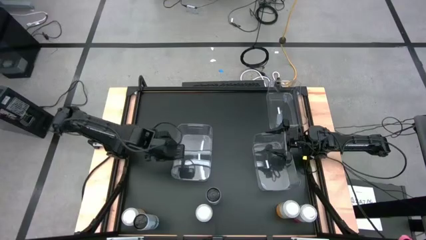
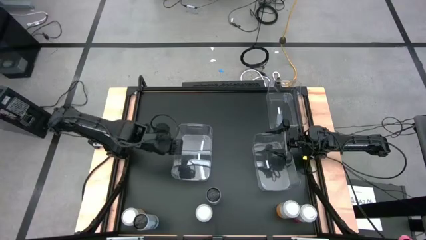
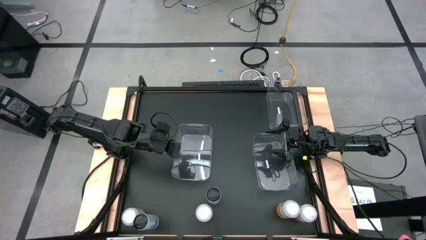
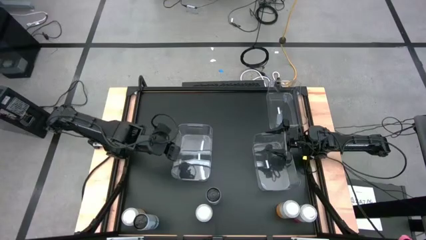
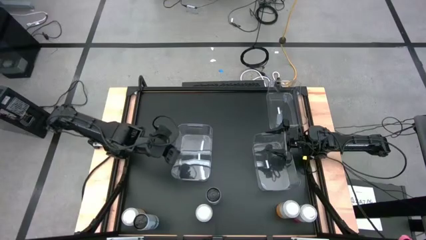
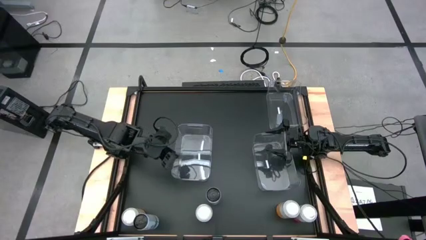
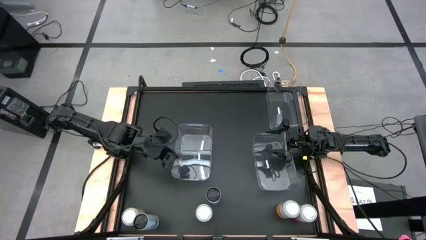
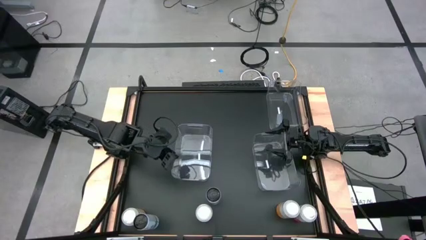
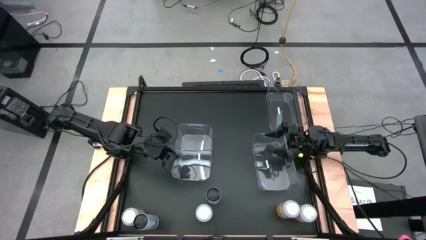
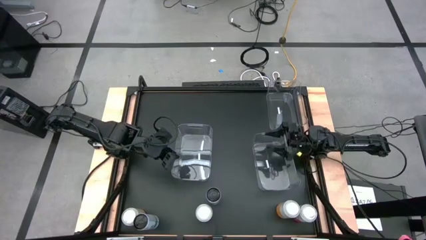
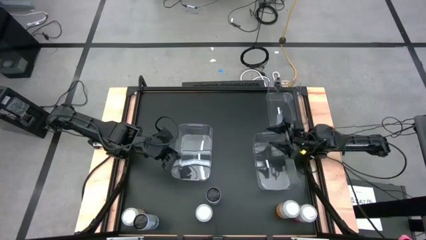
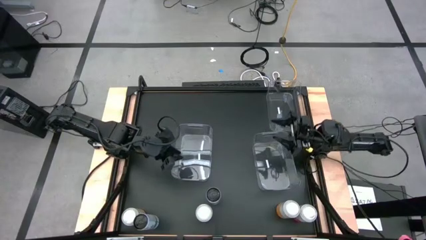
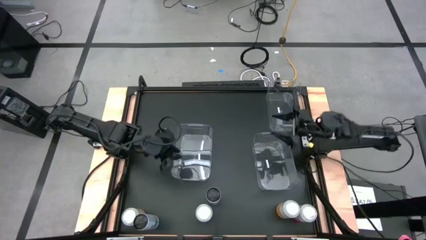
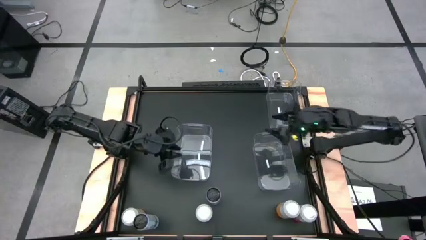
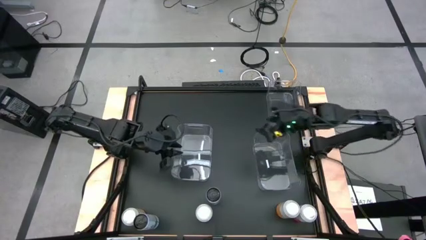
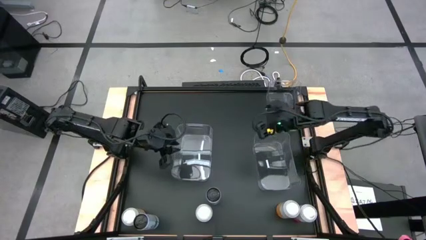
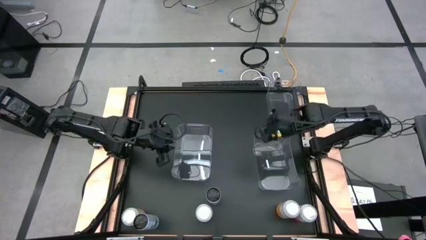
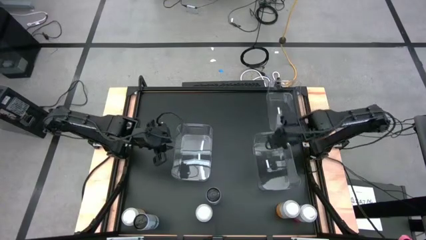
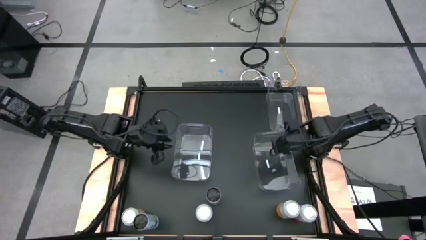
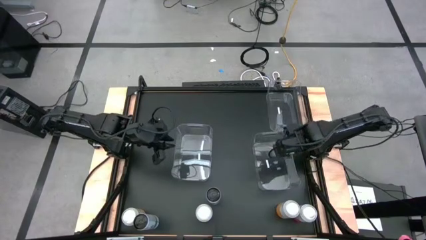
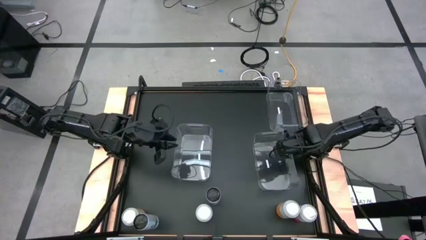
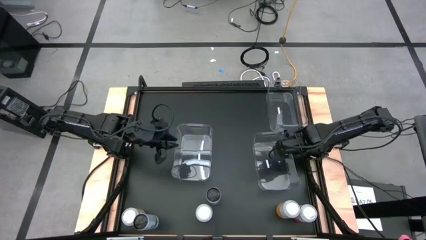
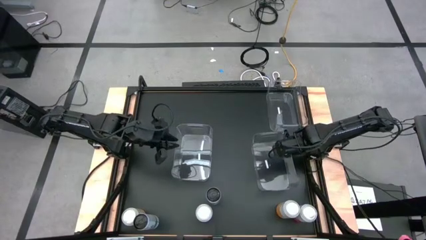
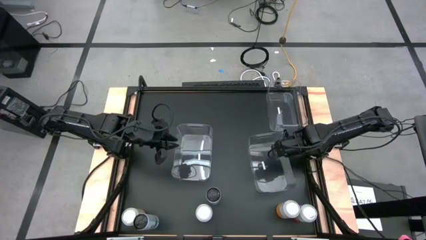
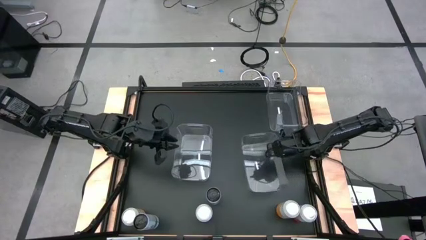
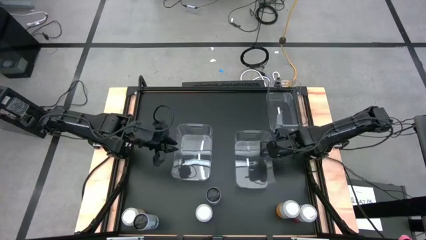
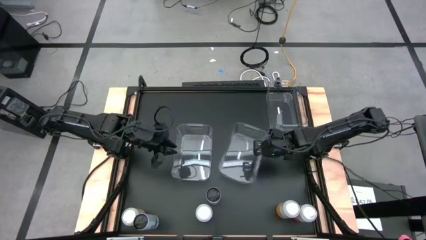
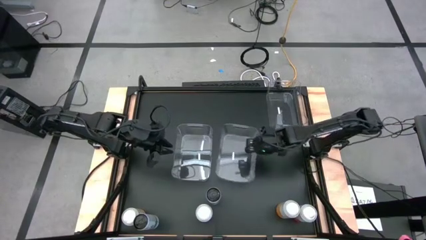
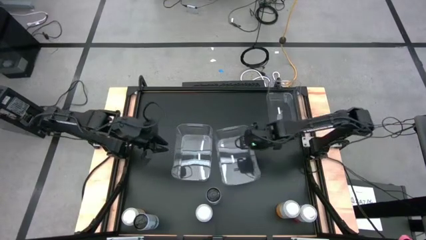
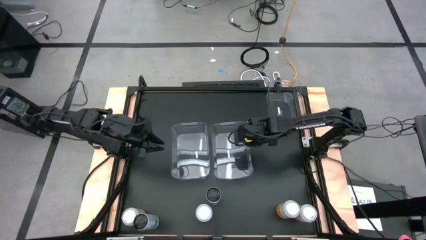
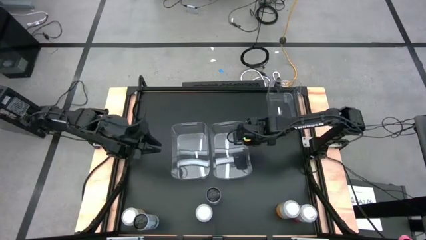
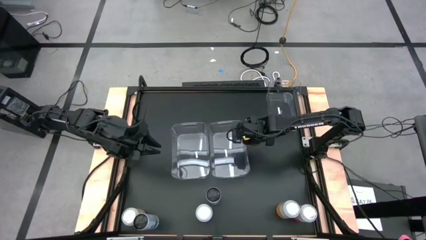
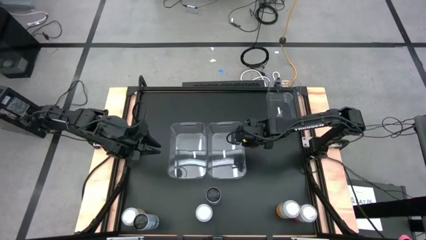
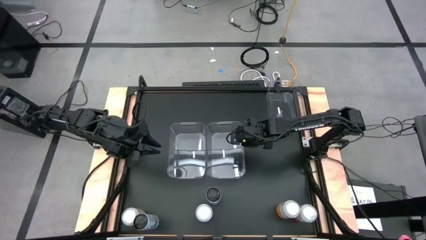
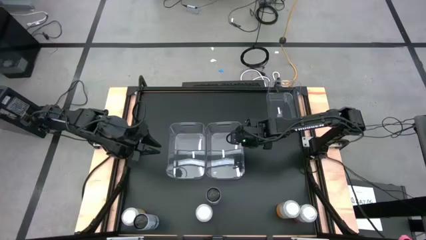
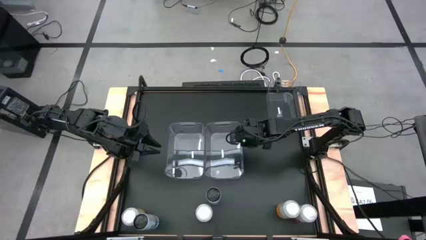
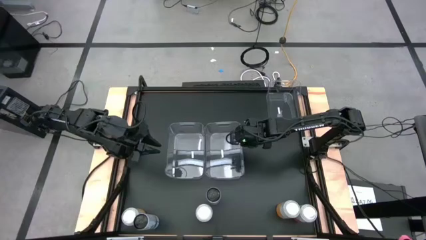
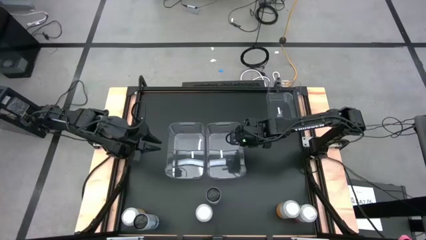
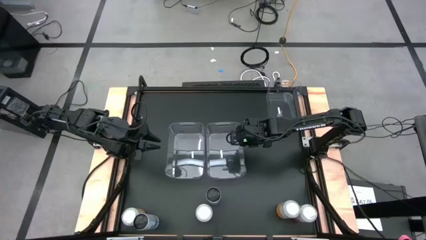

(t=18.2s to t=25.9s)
Task: Sort soda cans
Move the bottom right transparent bin to the center of the table

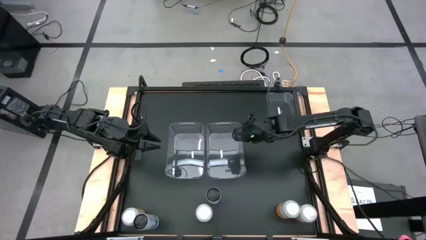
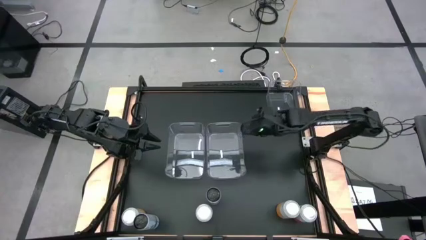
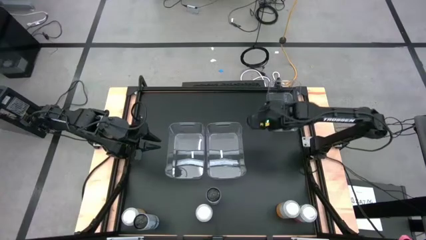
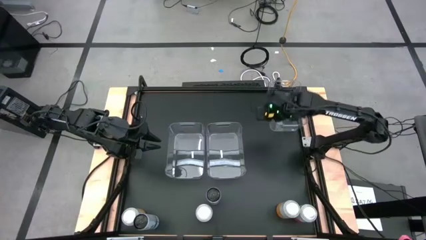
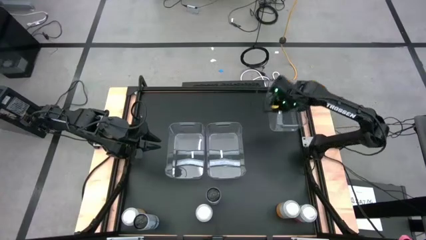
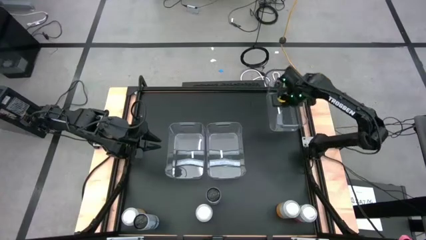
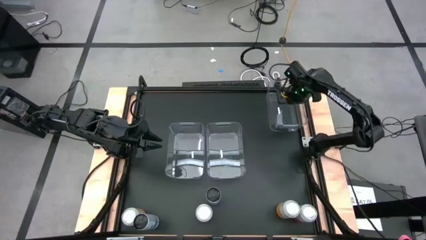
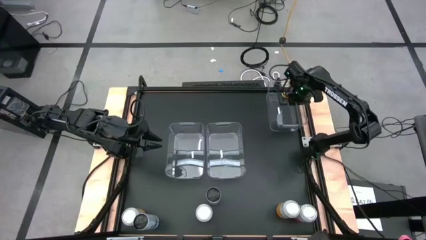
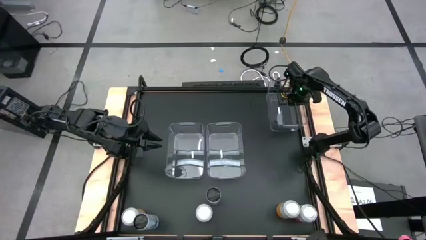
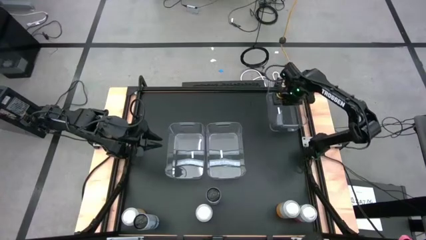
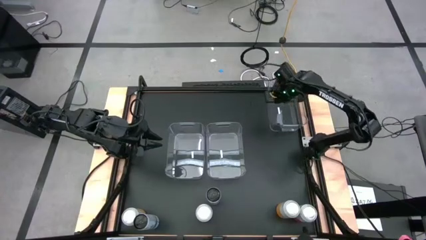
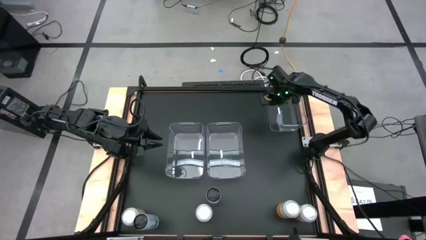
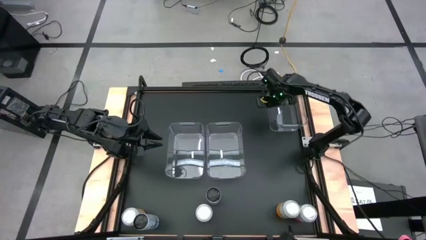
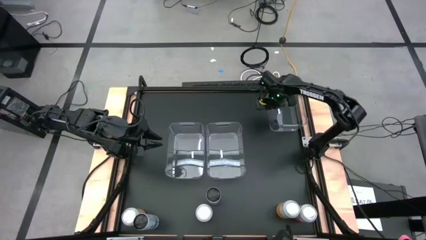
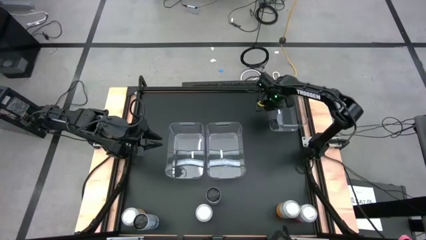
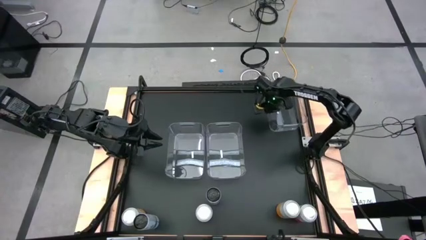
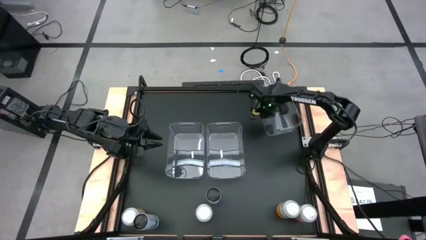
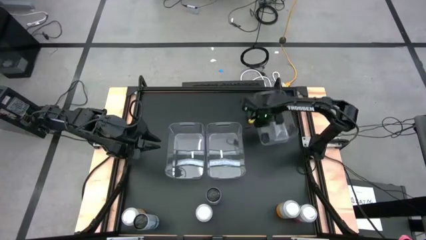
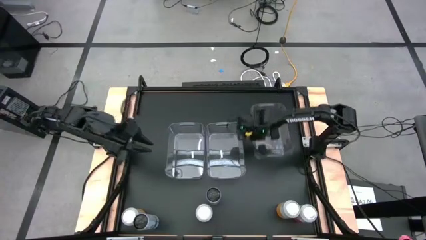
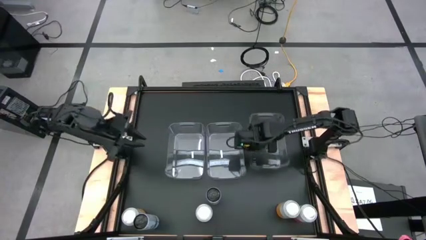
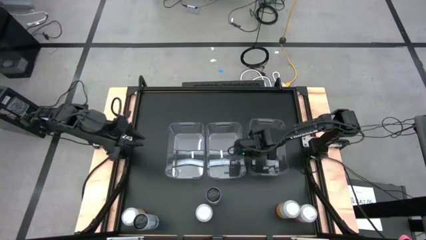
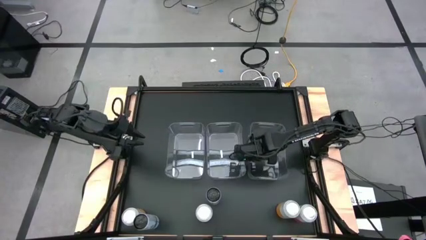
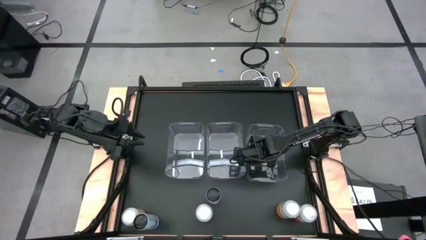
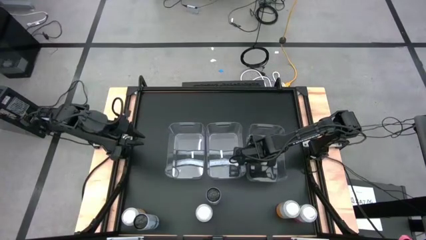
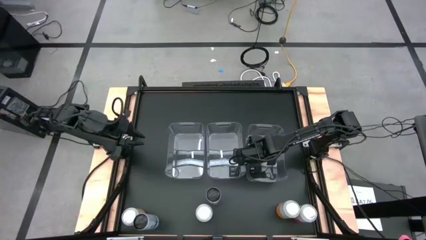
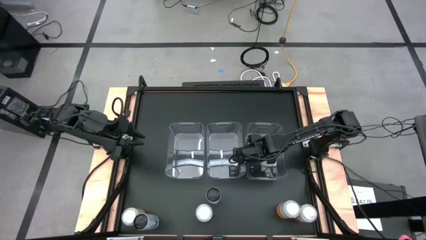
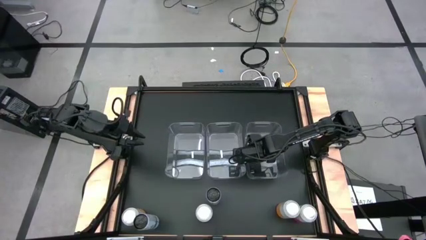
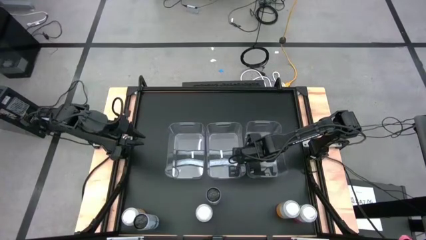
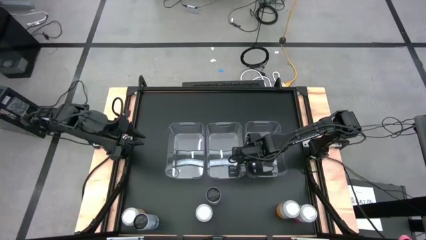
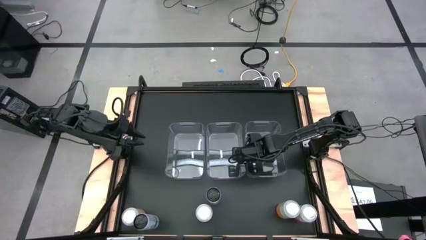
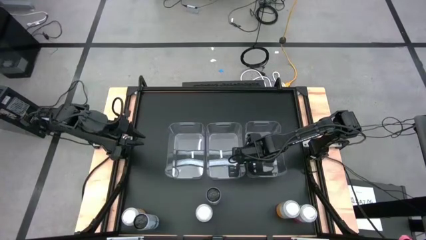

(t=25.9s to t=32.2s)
Move the top transparent bin to the middle right of the table

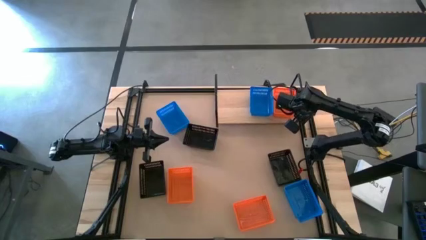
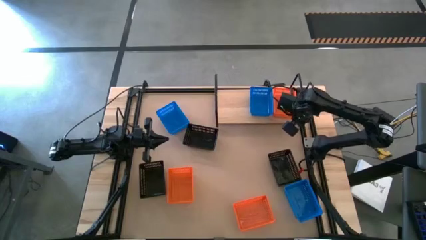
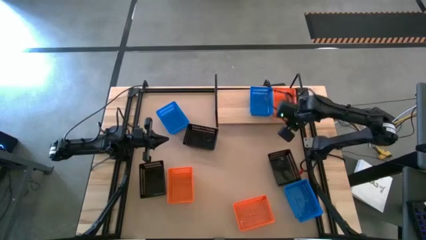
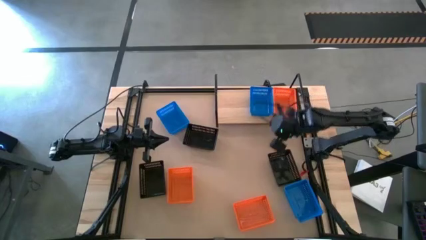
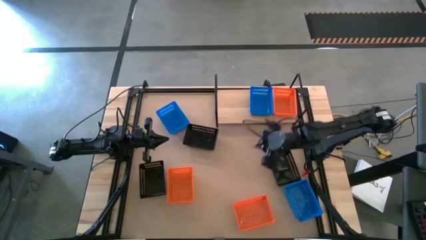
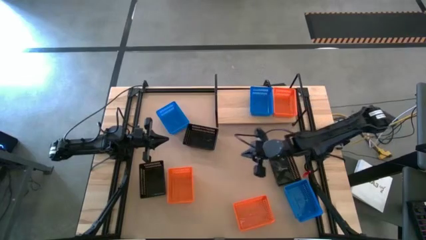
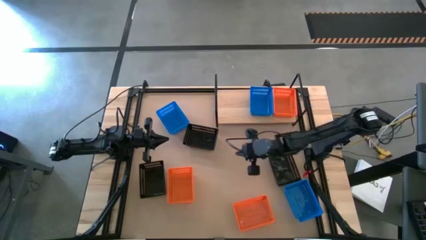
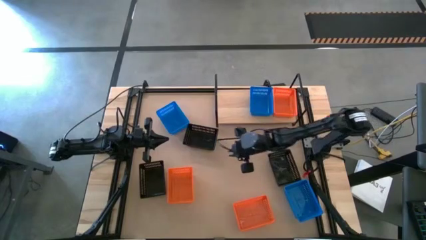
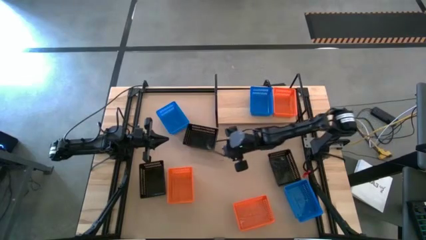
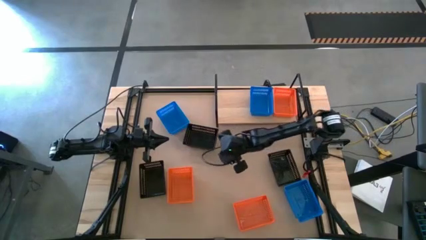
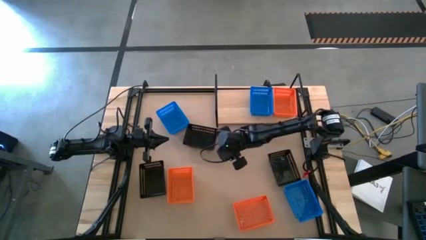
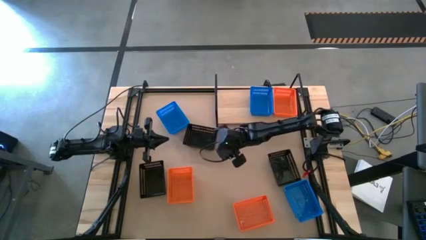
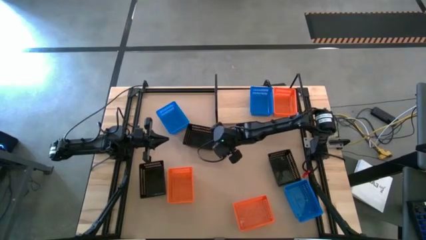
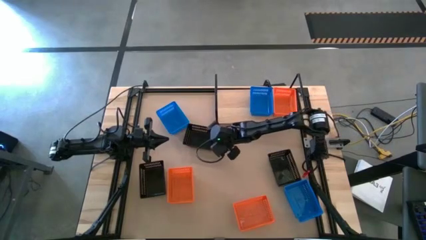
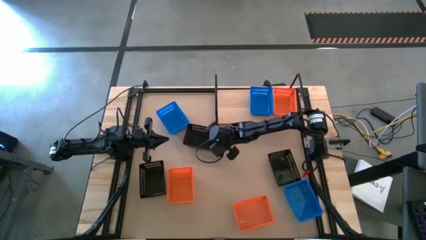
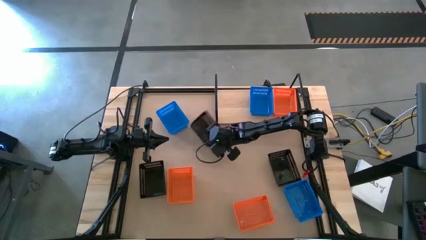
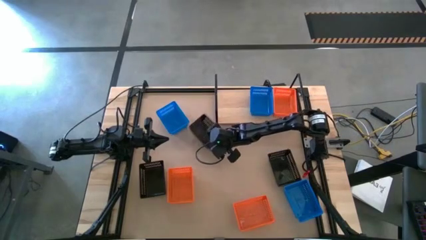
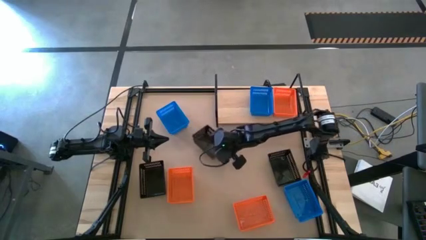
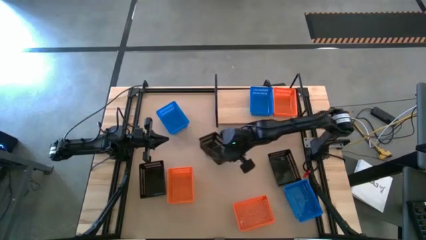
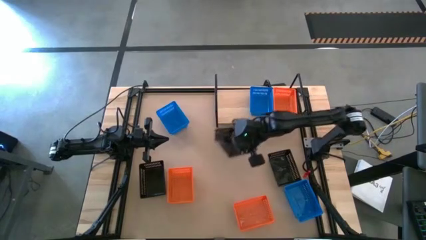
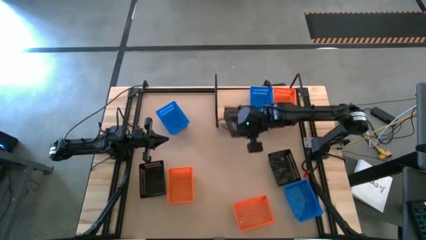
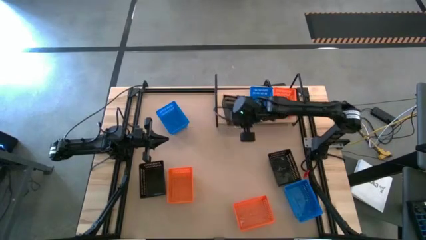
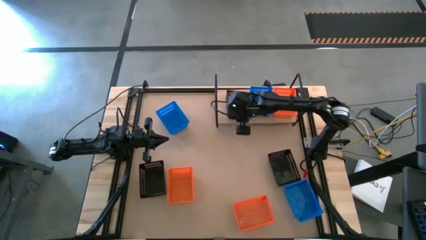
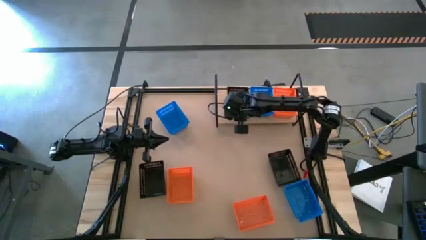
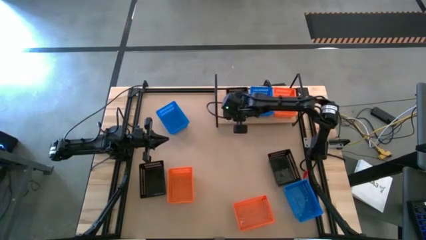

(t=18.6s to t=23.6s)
Task: Stack baskets on shelf by color
Put the top black bin on the shelf
